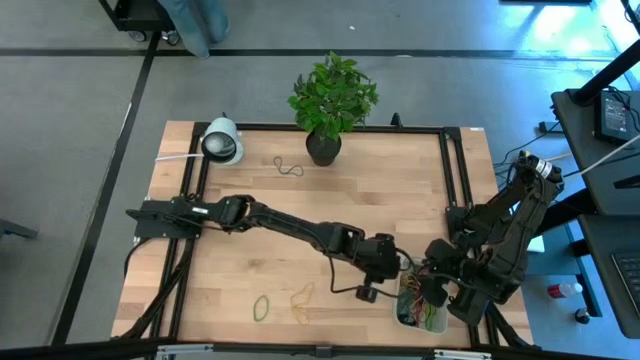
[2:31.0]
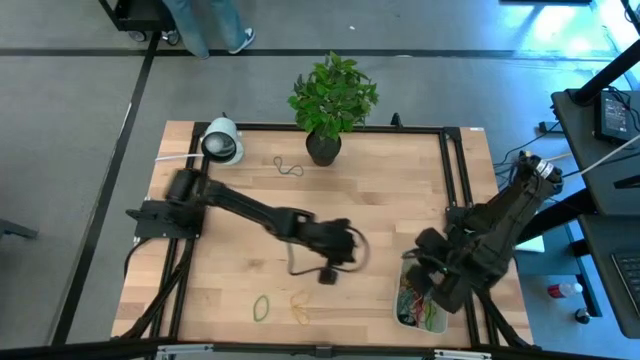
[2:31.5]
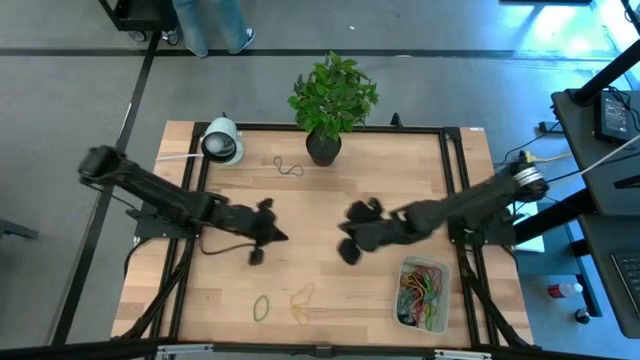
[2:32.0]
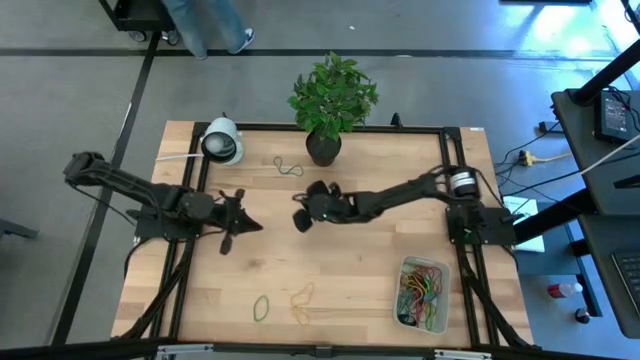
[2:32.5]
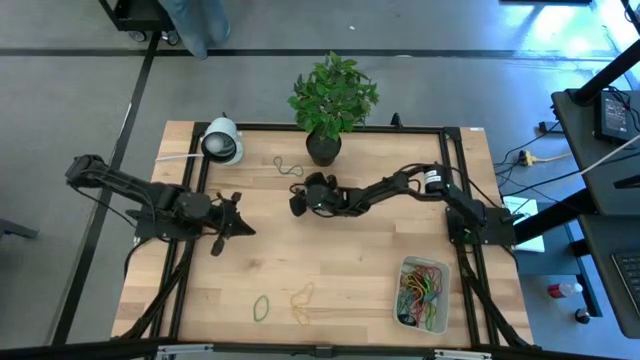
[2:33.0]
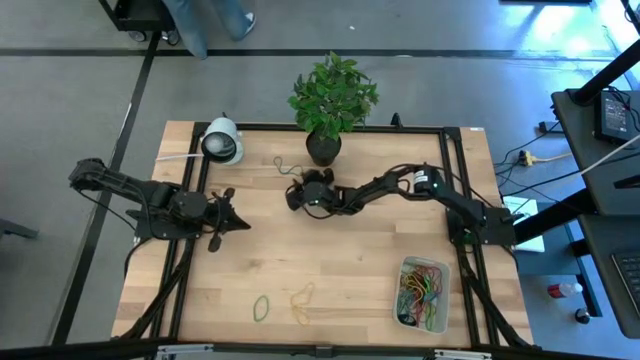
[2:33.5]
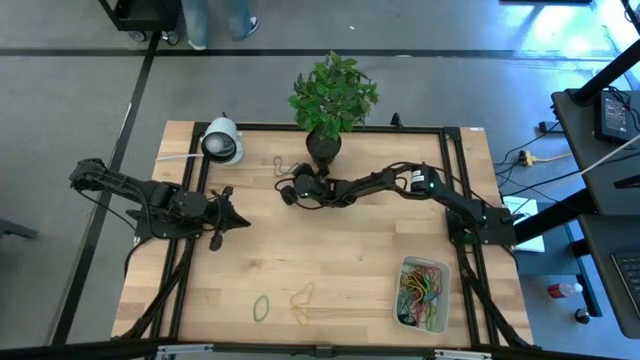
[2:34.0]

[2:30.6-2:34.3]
Task: Pick and place rubber bands into bin
Put the blue rubber band into the gray bin

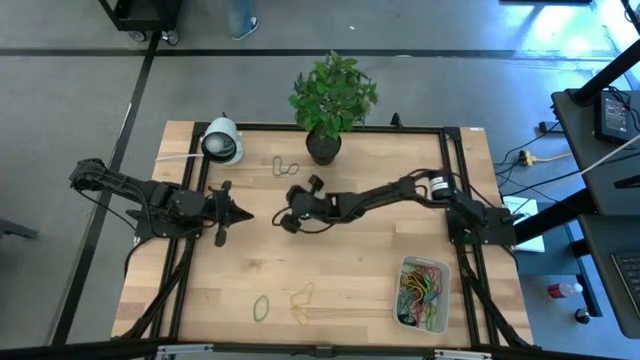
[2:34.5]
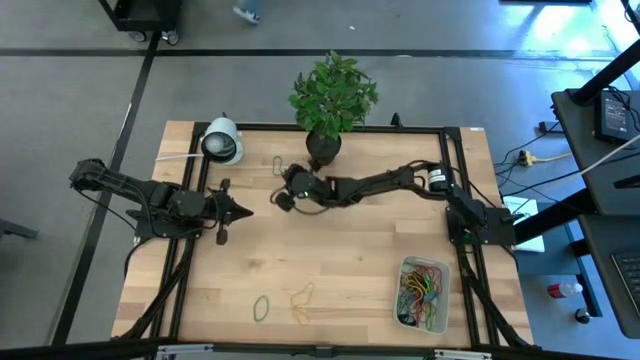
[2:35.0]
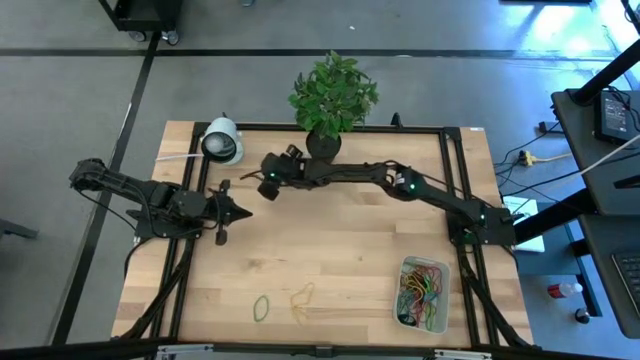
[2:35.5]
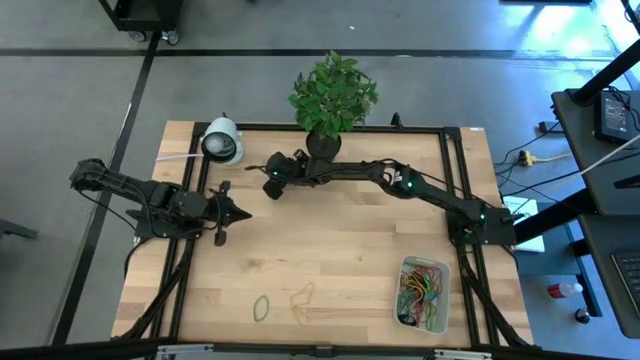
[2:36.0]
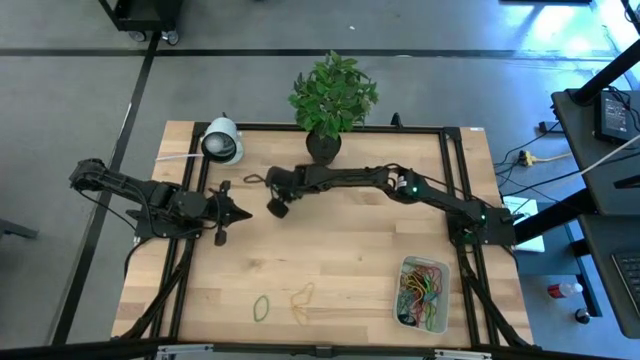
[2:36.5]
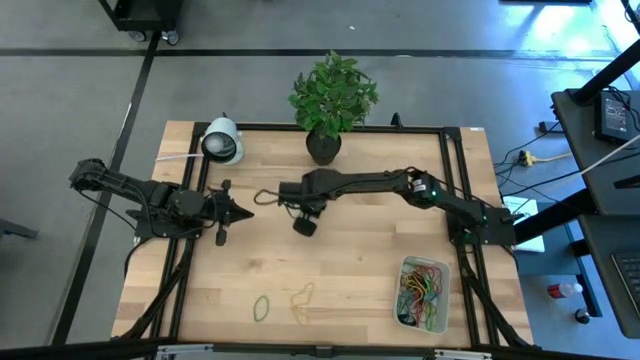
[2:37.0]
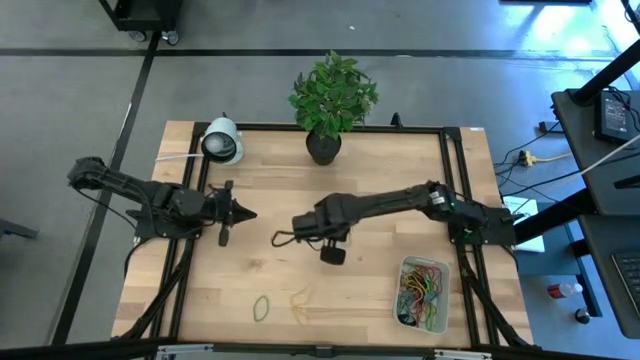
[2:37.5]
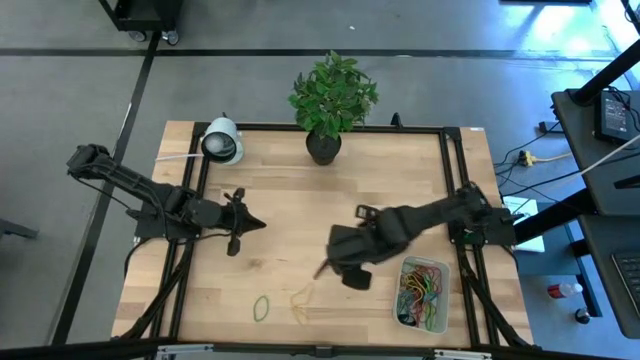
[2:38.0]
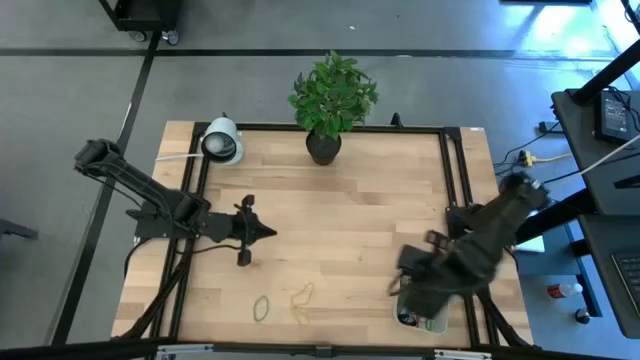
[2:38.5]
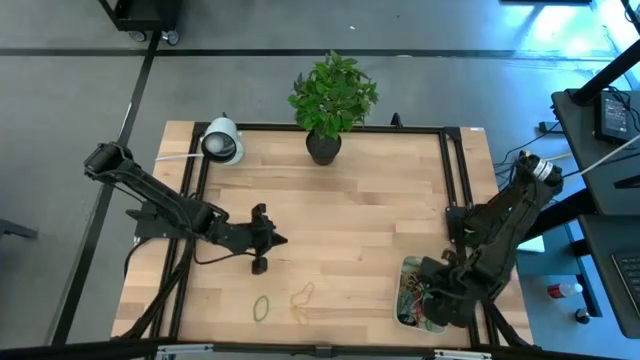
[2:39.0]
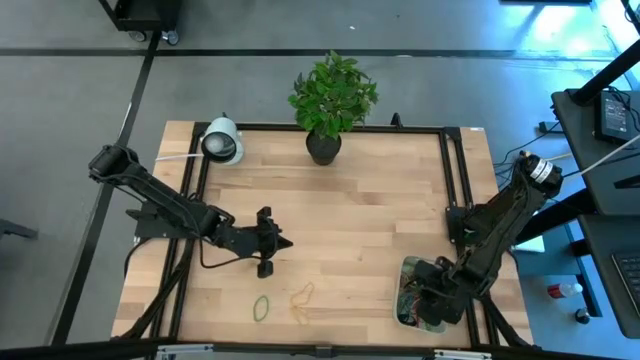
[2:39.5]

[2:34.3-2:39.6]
Put the blue rubber band into the gray bin

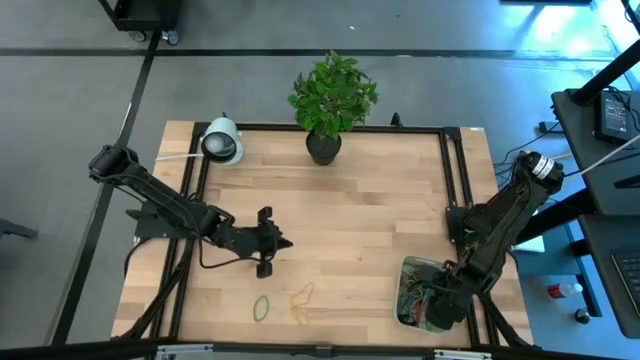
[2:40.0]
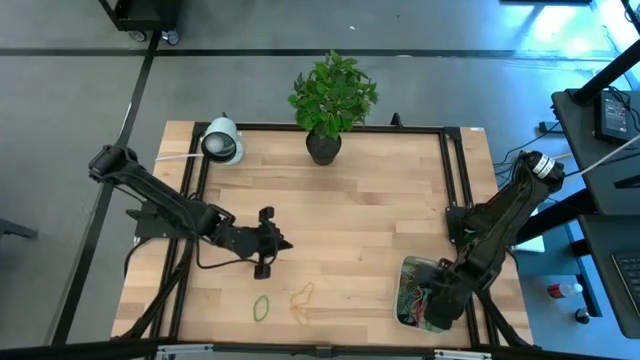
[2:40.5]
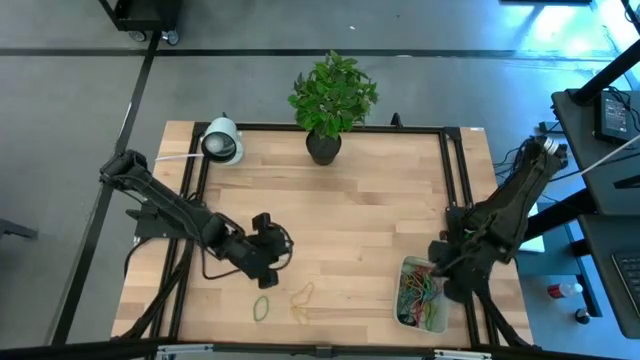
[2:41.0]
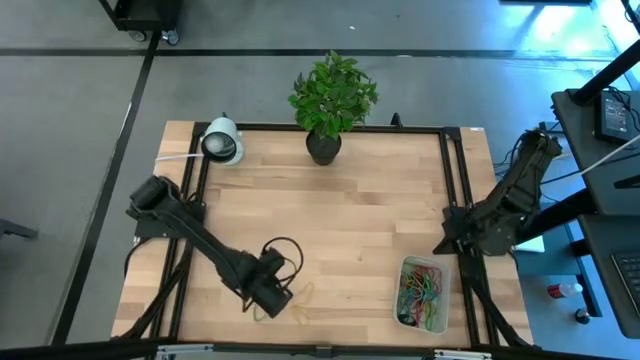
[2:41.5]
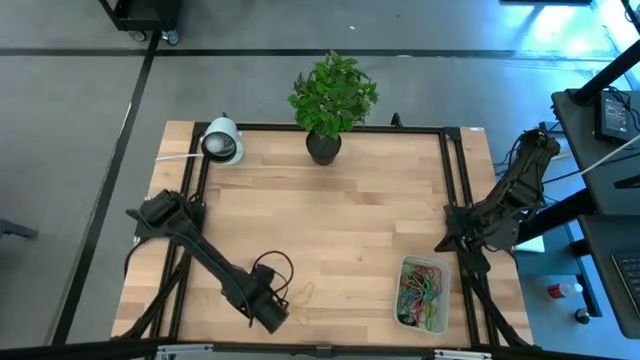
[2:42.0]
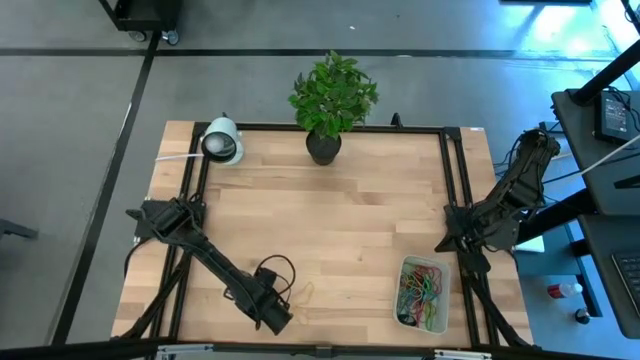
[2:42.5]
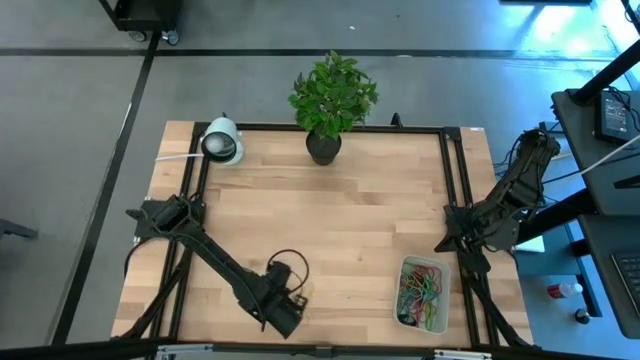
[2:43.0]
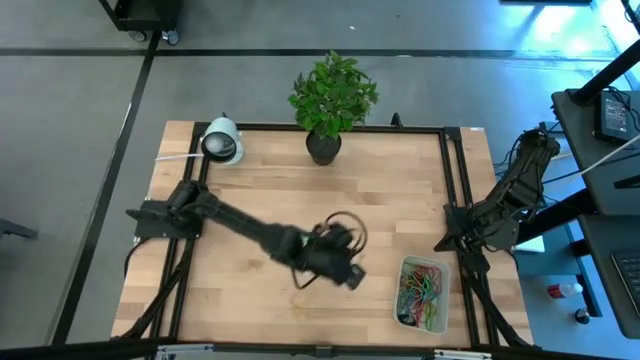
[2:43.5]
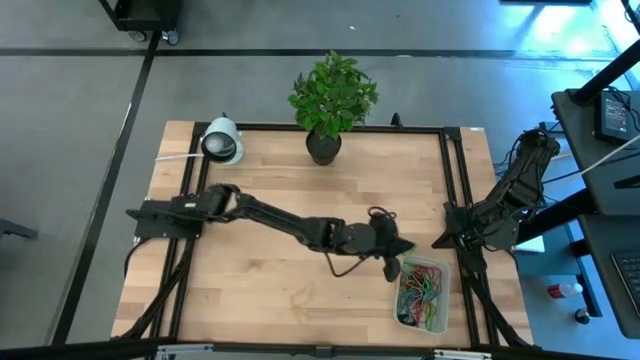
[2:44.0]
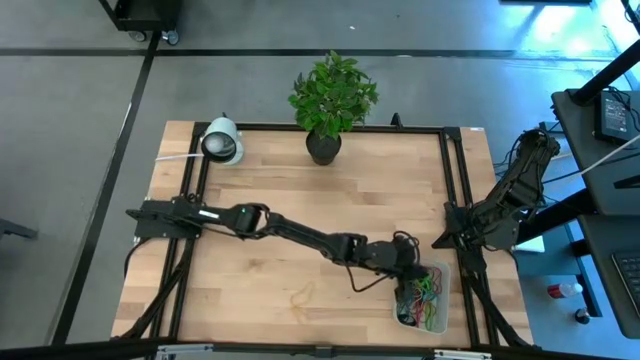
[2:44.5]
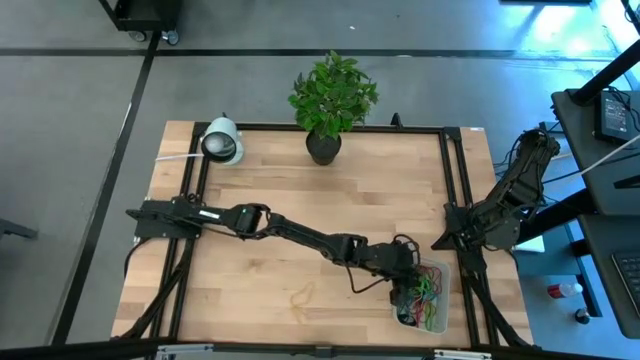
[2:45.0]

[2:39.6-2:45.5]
Put the green rubber band into the gray bin

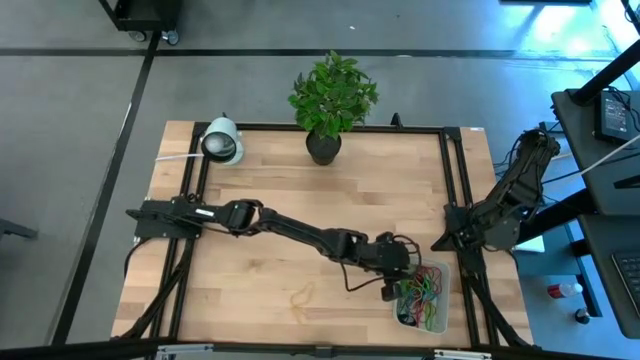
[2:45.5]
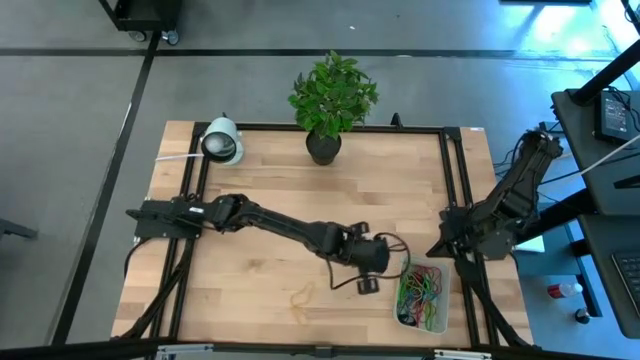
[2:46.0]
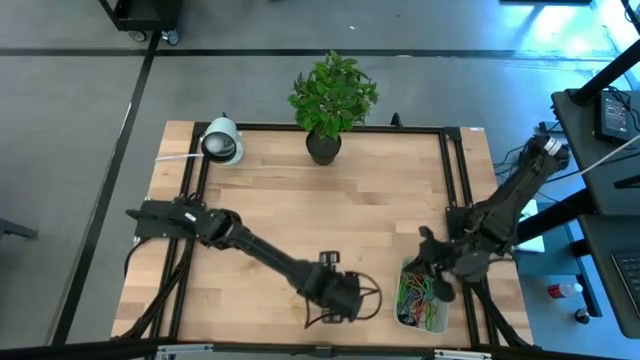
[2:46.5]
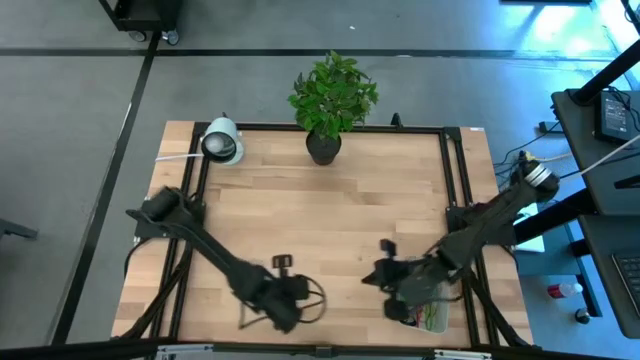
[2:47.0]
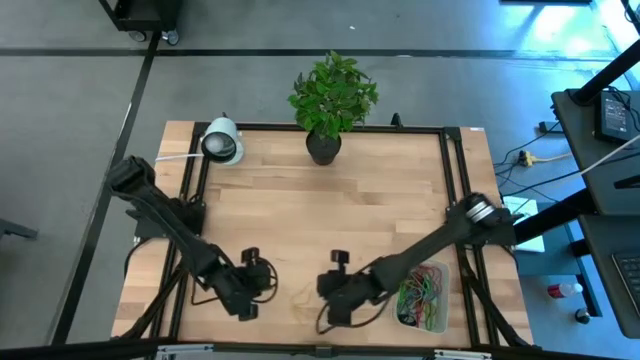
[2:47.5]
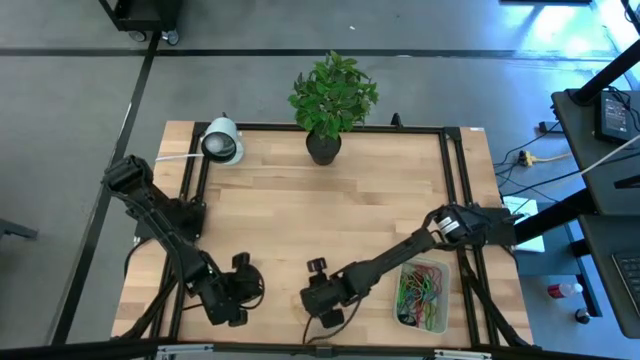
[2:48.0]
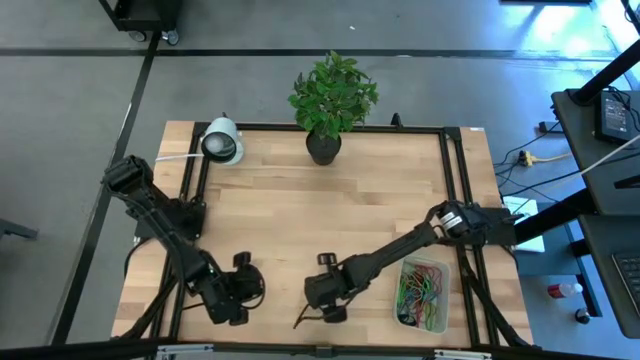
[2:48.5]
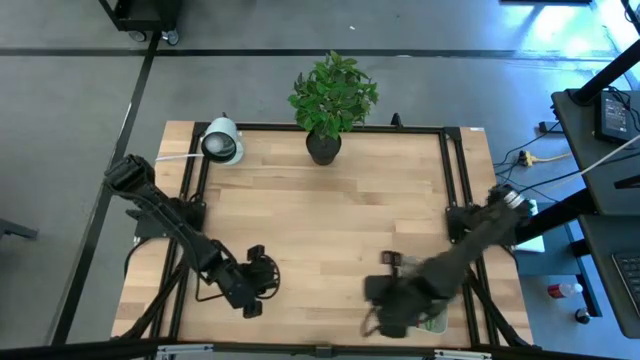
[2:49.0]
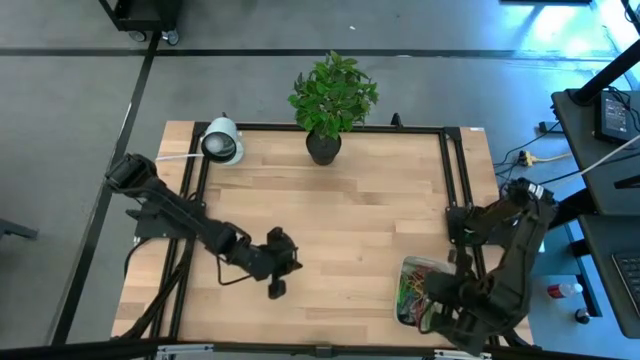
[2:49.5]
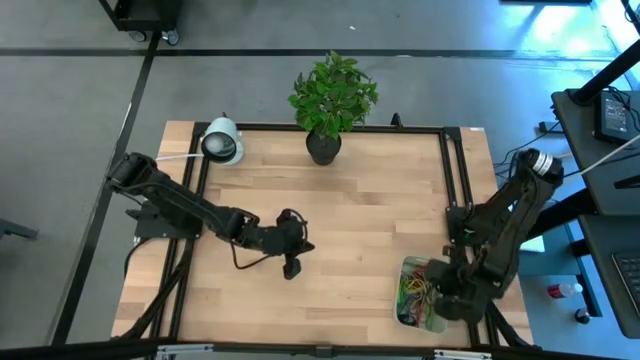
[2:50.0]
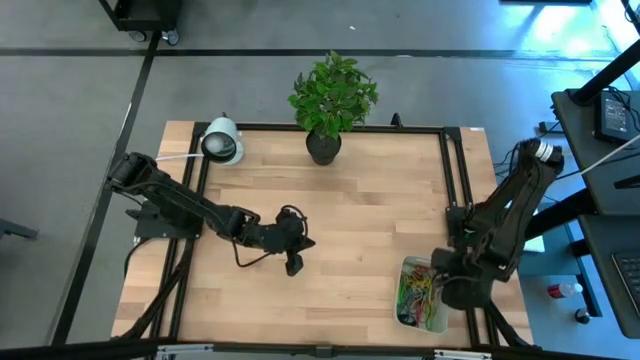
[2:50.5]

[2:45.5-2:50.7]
Put the yellow rubber band into the gray bin
